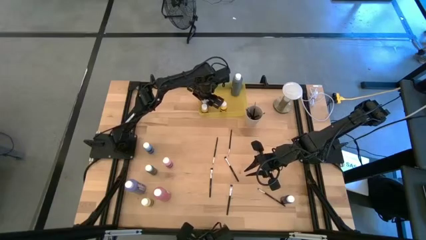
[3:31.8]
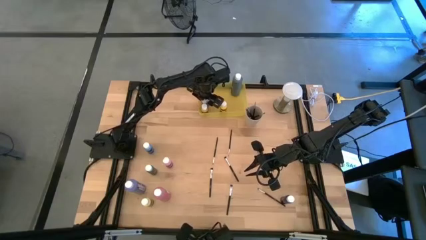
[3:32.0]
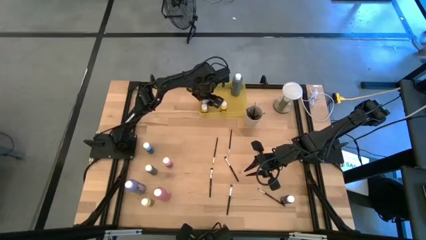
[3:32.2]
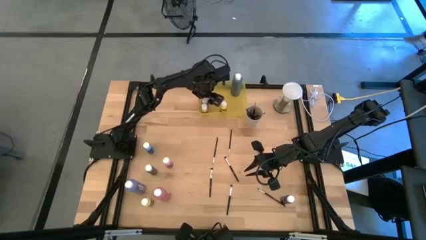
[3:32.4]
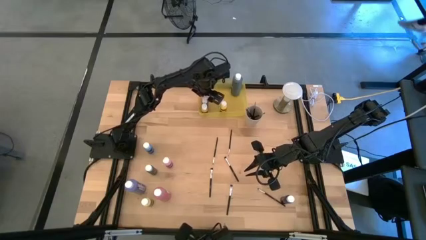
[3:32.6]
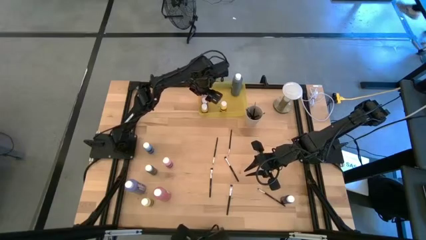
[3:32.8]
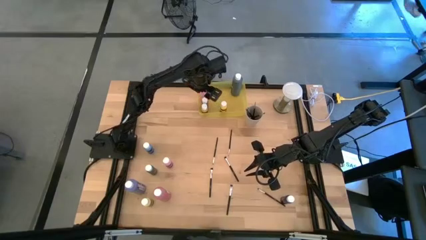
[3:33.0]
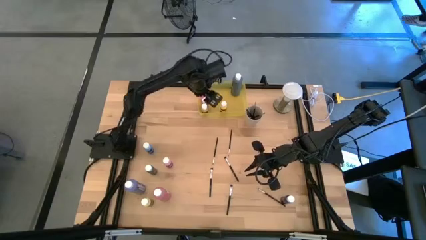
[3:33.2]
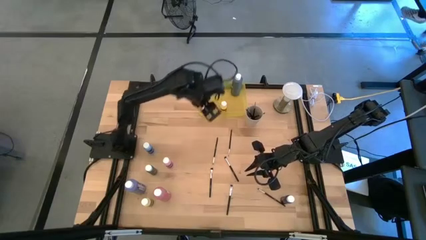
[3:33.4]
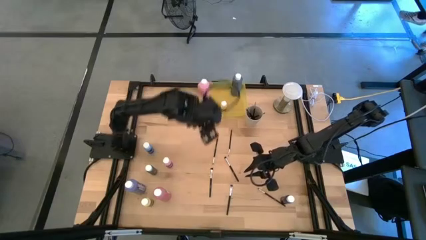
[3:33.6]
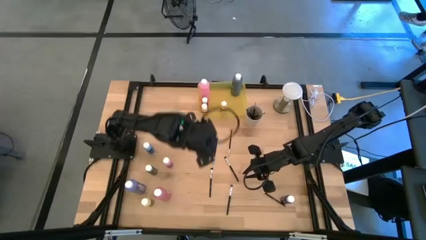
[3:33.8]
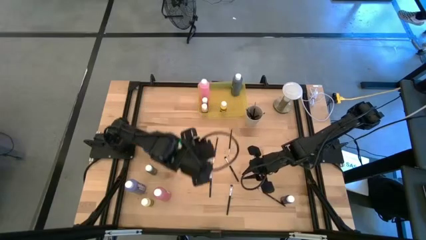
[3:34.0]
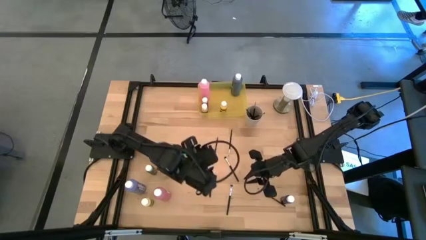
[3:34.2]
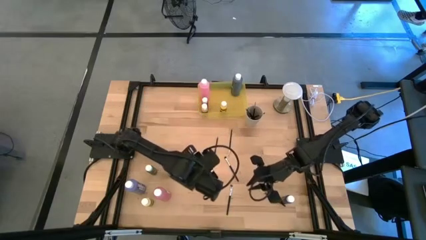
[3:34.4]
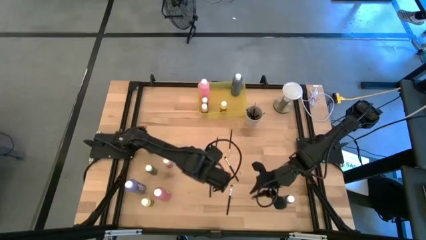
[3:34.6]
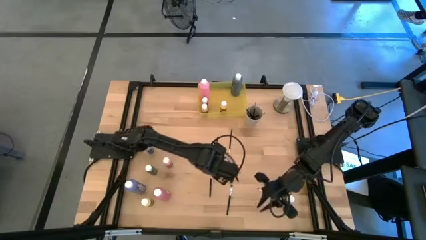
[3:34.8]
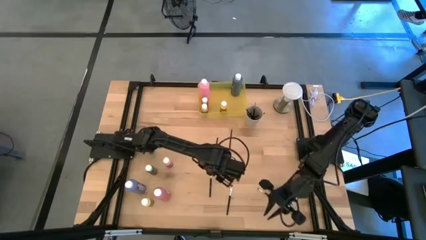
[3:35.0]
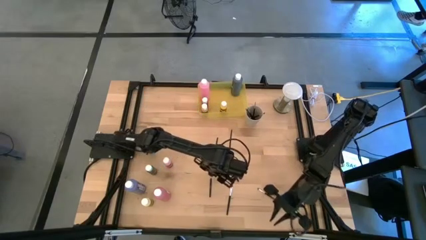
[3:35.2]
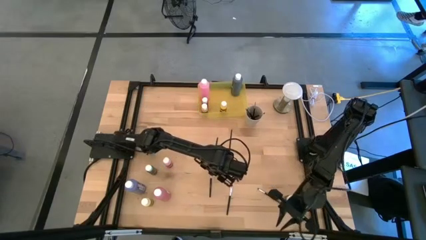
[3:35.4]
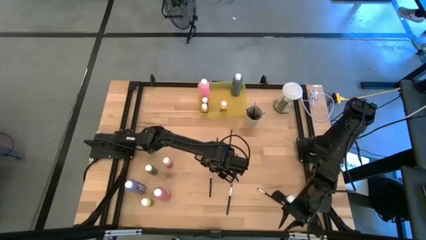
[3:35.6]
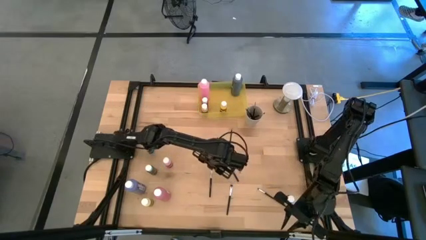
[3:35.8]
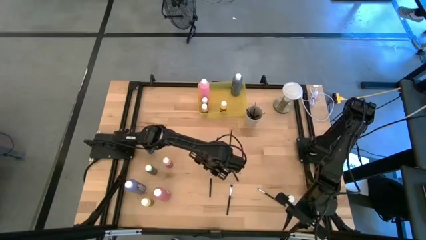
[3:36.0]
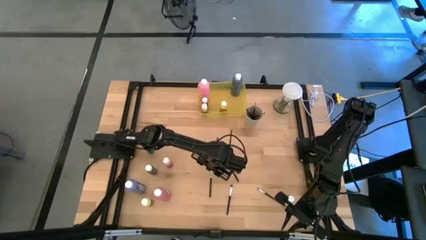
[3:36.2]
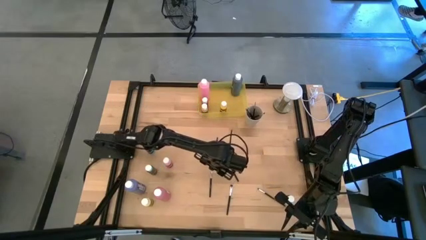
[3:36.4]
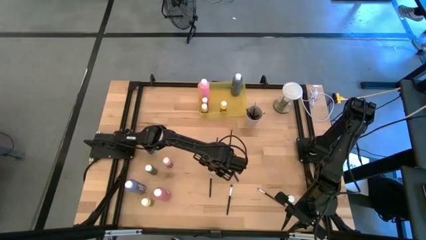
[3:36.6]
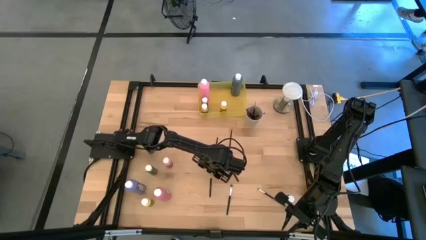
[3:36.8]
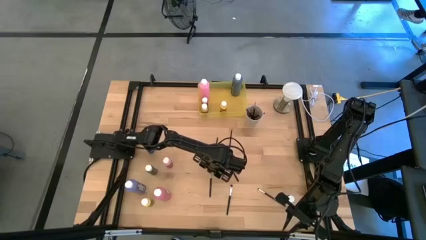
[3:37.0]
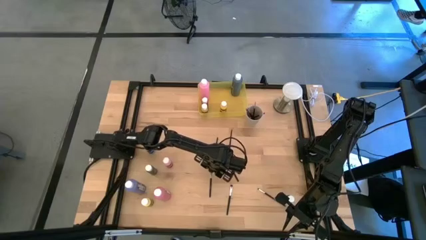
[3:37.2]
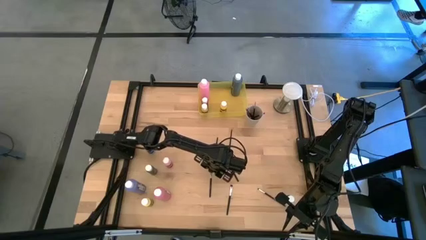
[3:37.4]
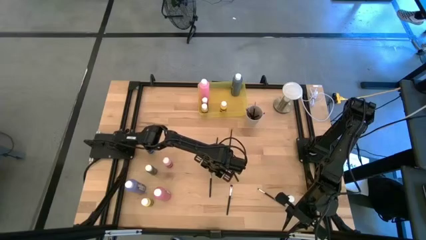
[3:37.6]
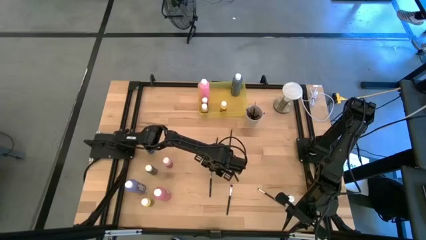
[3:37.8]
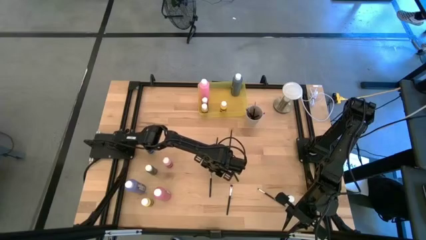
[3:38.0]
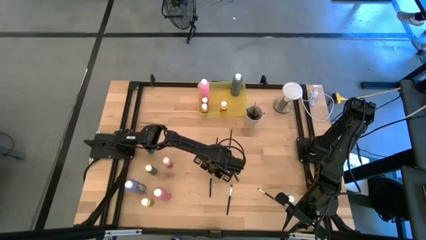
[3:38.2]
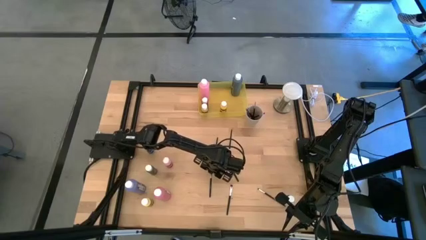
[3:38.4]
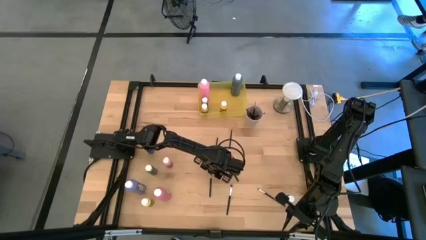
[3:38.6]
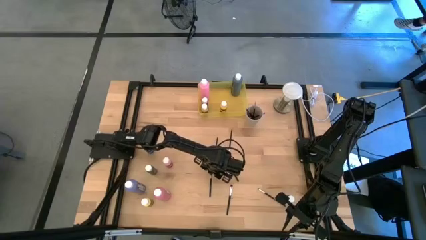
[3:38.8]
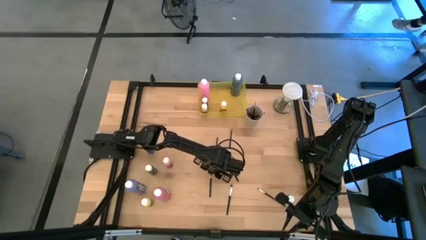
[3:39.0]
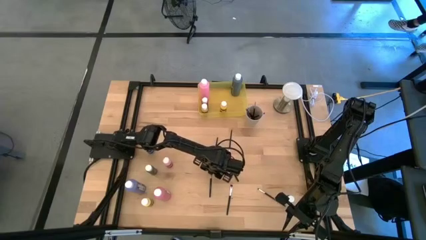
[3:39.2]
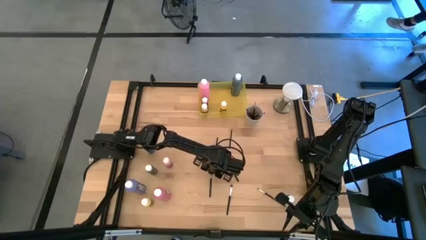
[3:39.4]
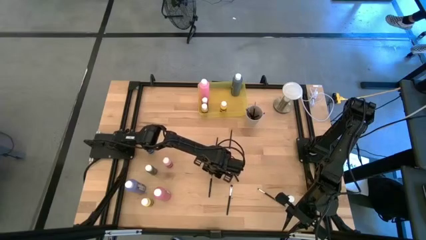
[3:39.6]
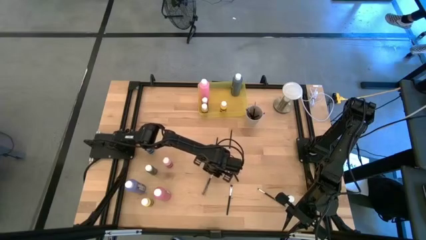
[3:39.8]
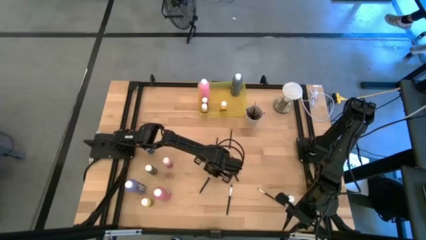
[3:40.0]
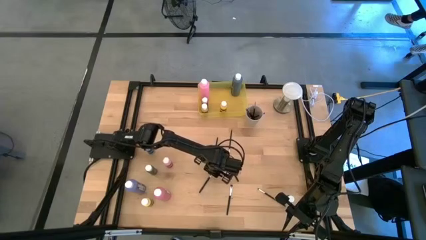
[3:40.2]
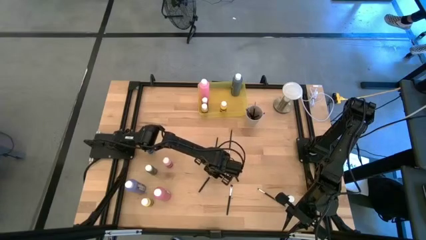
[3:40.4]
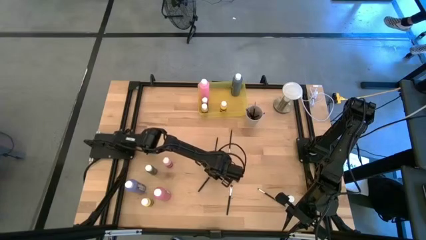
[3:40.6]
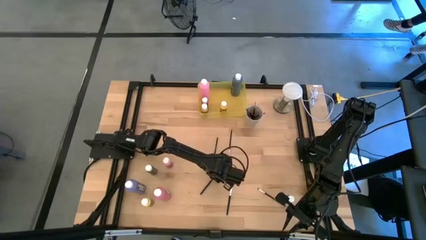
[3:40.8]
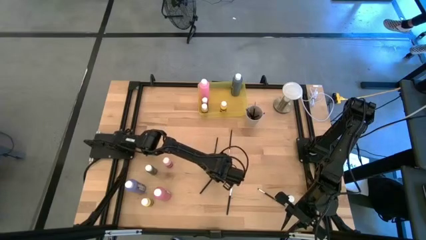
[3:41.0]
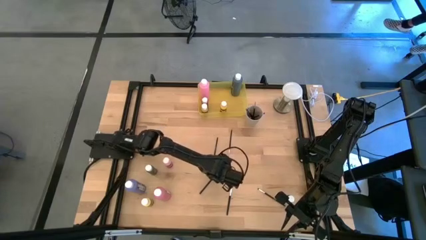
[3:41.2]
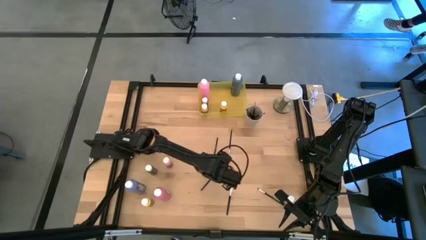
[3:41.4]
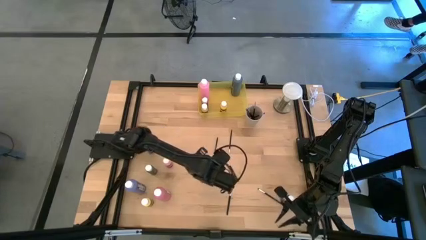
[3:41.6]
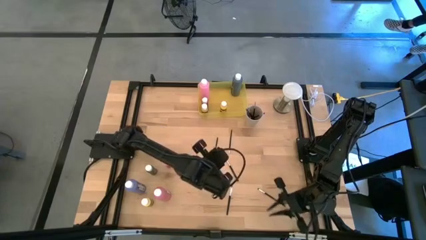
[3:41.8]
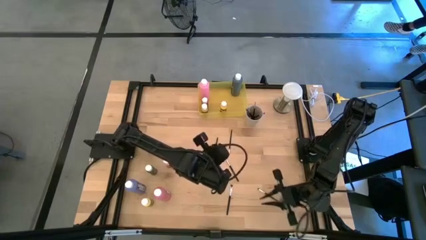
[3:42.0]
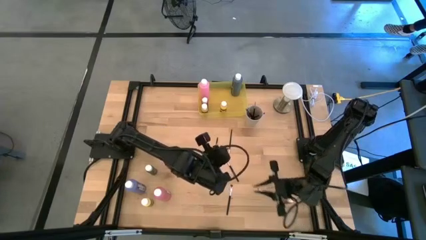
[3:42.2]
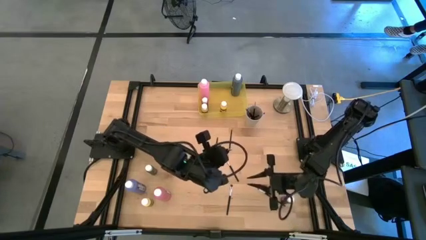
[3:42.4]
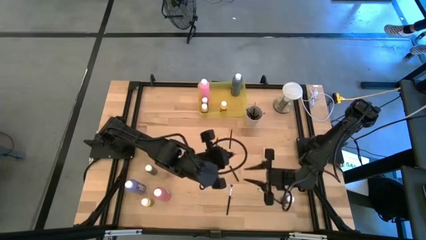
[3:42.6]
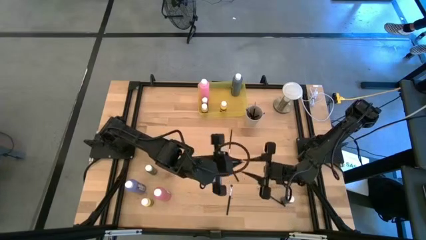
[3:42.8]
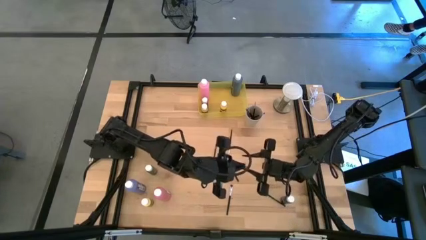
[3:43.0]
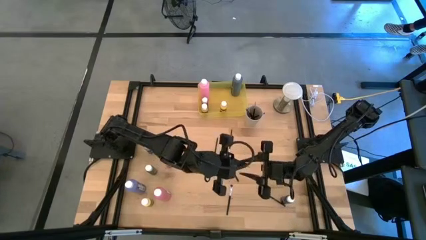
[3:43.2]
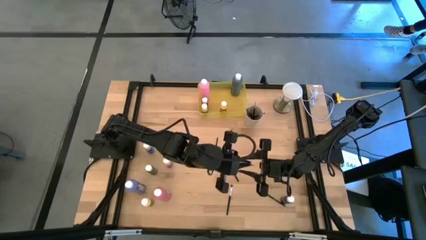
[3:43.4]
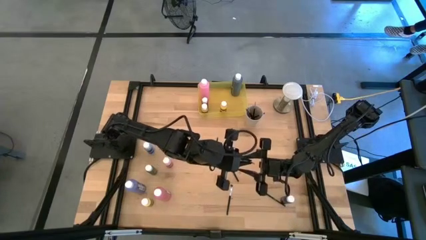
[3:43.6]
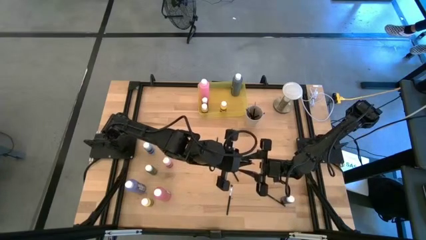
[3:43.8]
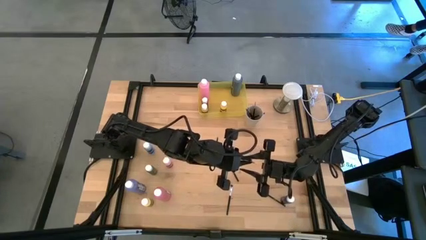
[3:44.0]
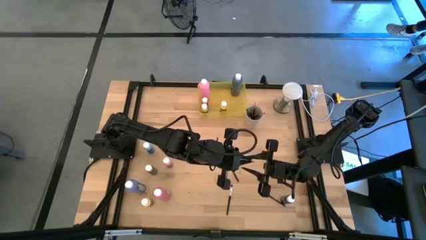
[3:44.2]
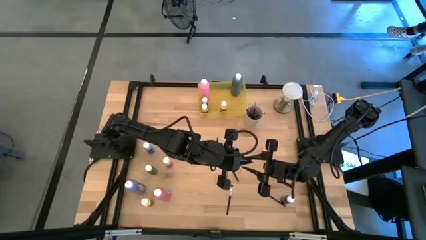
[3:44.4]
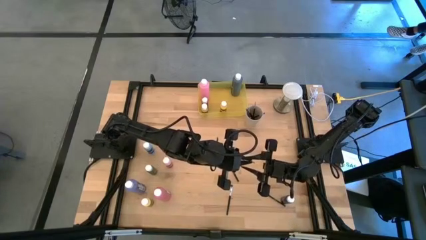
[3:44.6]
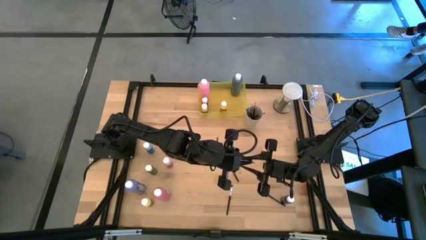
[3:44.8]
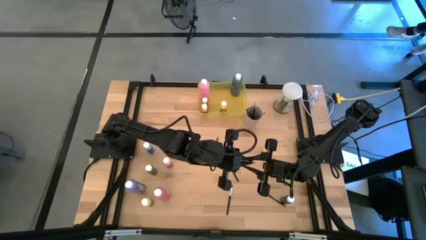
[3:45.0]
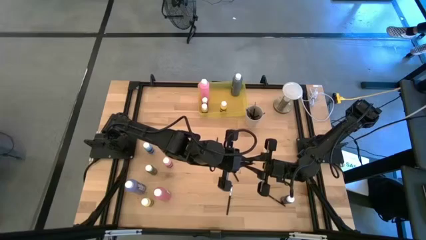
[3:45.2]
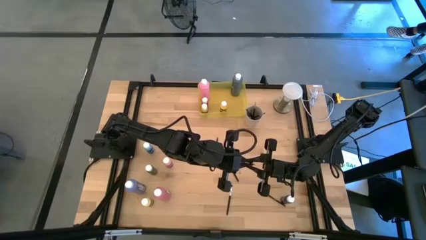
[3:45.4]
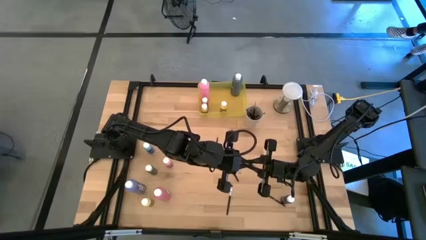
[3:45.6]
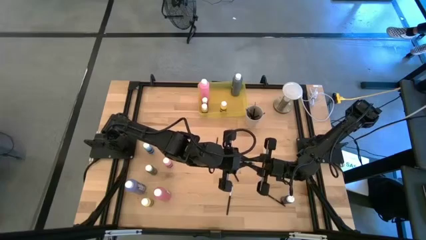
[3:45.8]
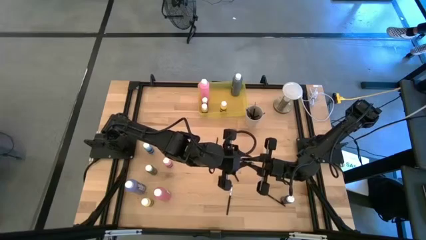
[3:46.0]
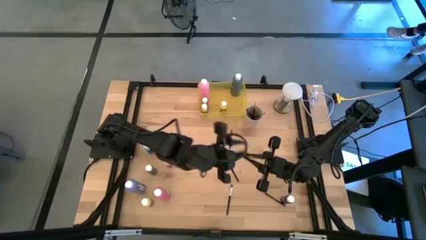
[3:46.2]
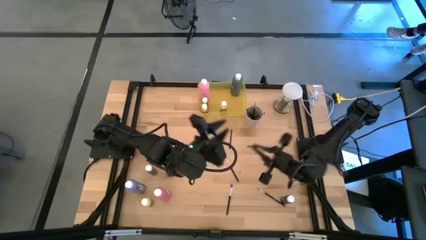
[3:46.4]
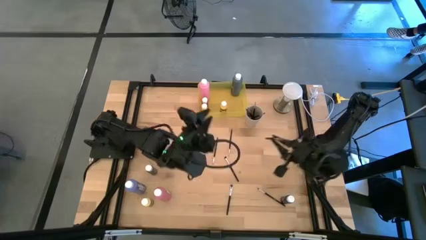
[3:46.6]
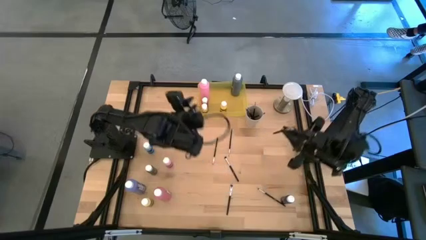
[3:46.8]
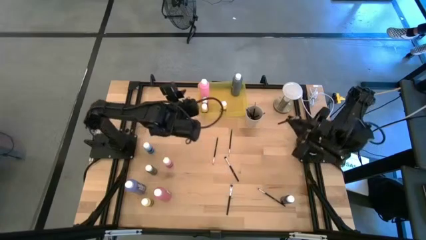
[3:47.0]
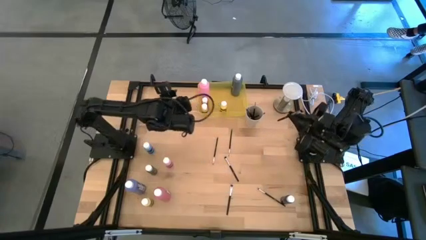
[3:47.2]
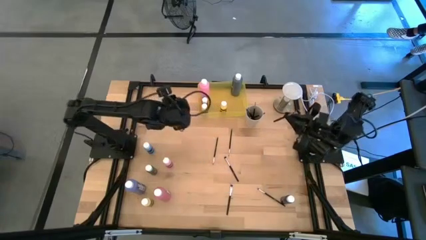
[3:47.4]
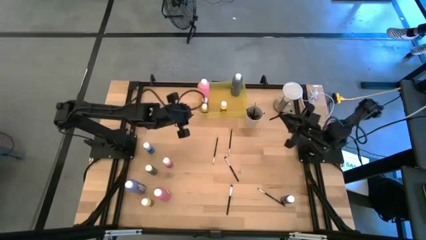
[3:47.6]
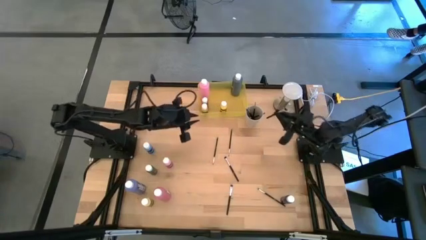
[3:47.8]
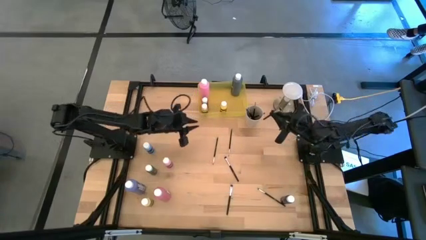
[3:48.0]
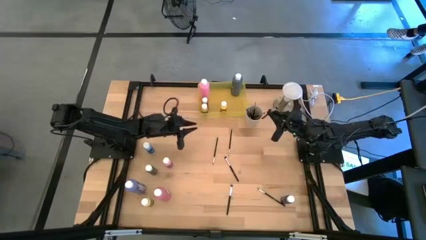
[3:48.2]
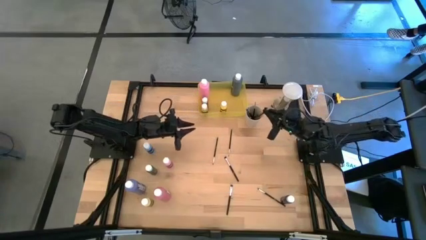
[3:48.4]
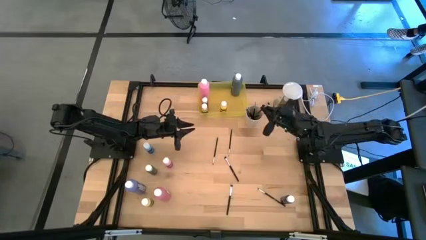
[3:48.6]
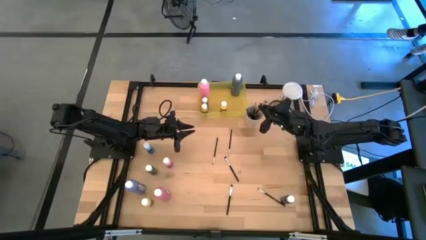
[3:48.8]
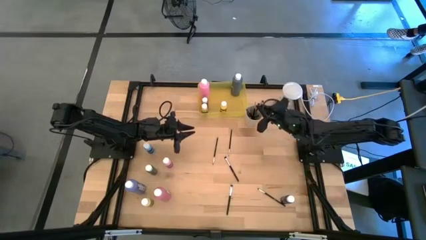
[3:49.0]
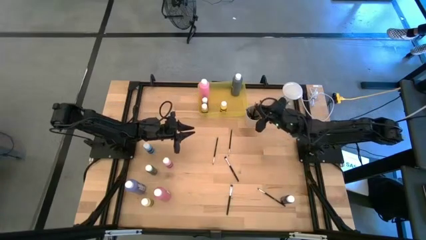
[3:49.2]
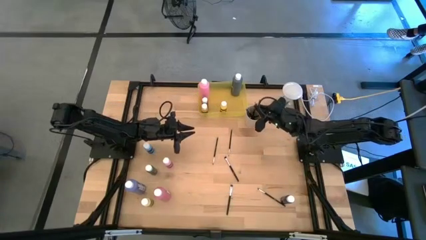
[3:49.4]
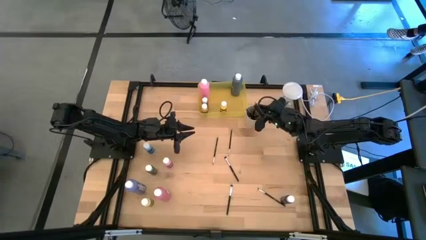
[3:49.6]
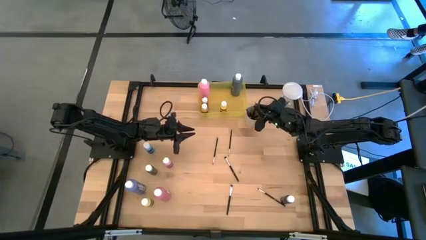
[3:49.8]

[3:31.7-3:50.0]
Task: Pick & Place Paint Supplies
Put the silver paint brush into the white cup
